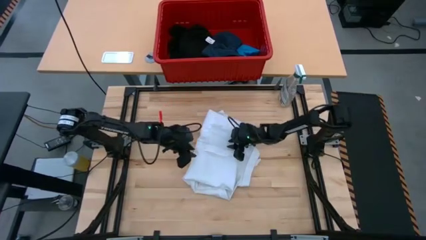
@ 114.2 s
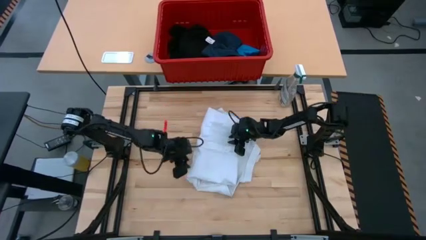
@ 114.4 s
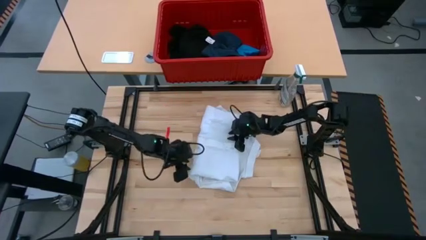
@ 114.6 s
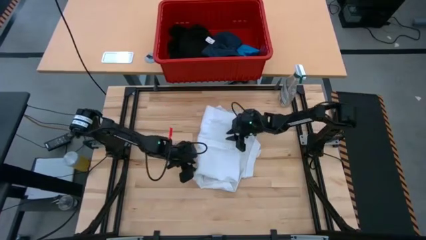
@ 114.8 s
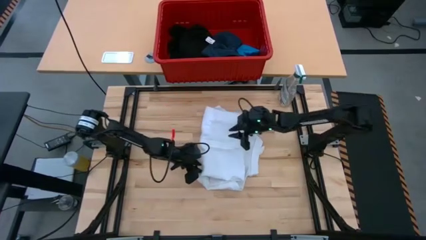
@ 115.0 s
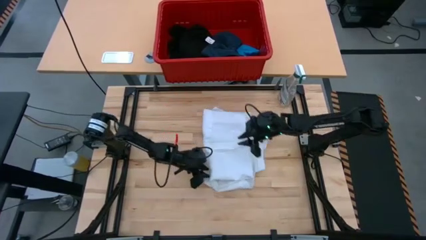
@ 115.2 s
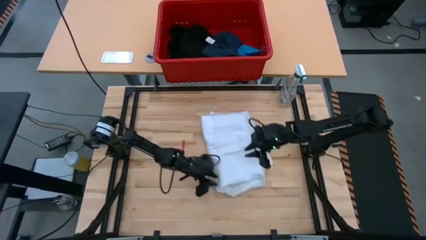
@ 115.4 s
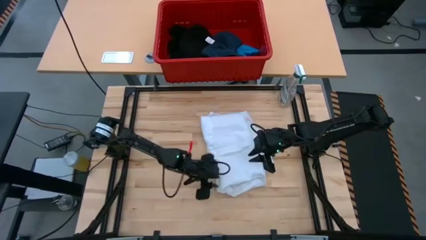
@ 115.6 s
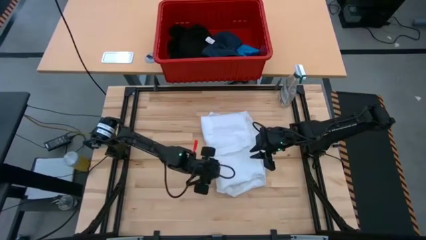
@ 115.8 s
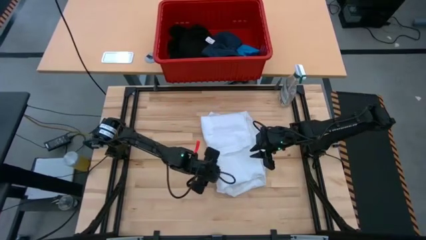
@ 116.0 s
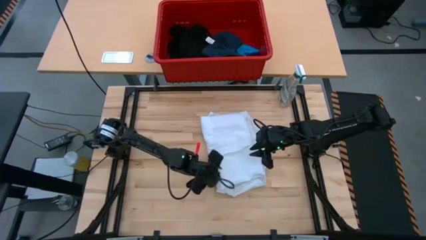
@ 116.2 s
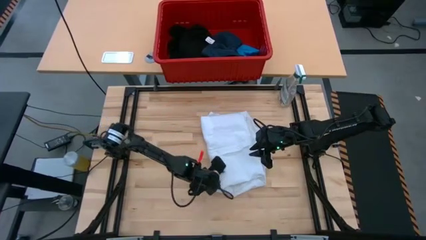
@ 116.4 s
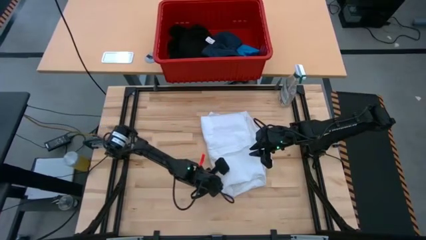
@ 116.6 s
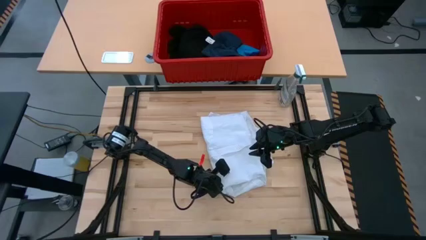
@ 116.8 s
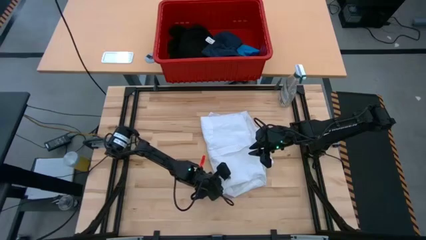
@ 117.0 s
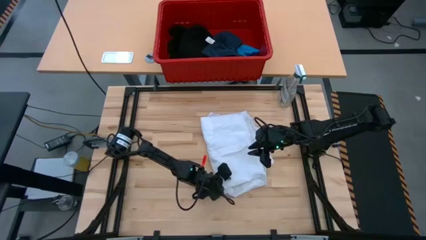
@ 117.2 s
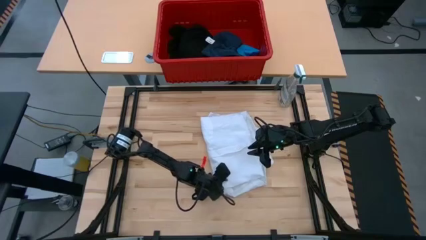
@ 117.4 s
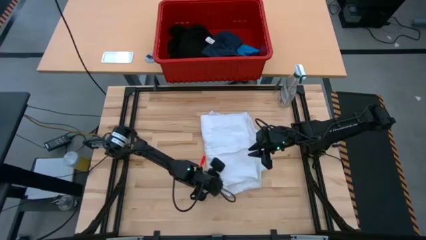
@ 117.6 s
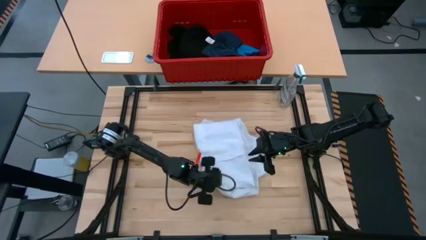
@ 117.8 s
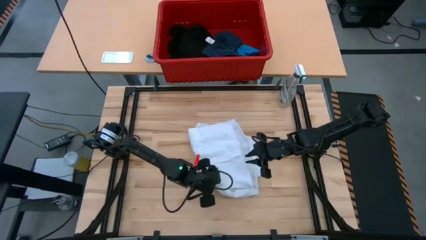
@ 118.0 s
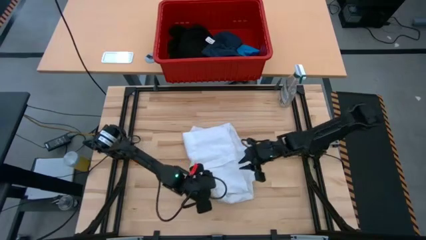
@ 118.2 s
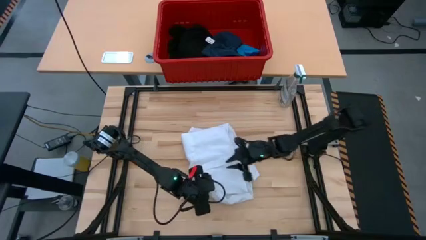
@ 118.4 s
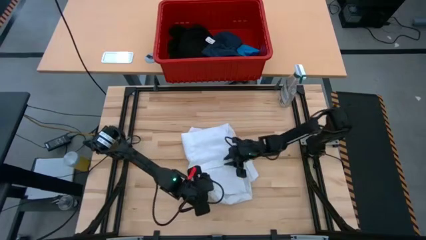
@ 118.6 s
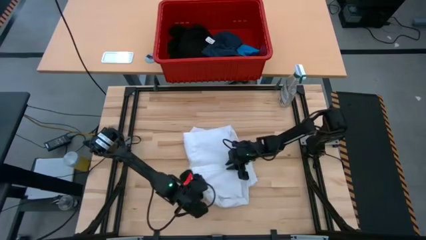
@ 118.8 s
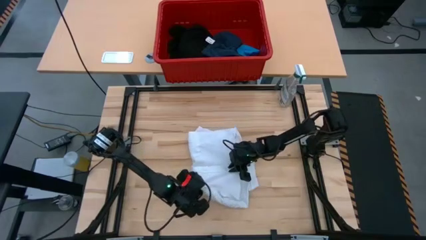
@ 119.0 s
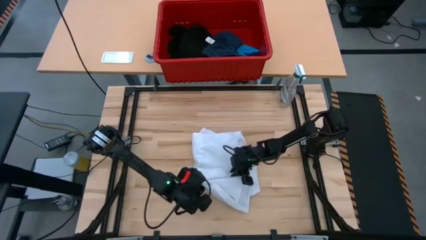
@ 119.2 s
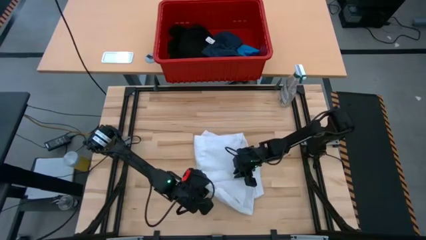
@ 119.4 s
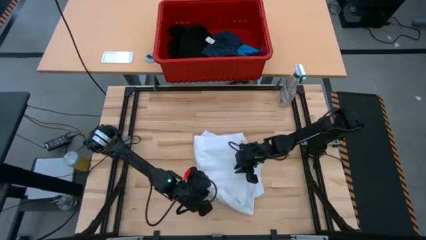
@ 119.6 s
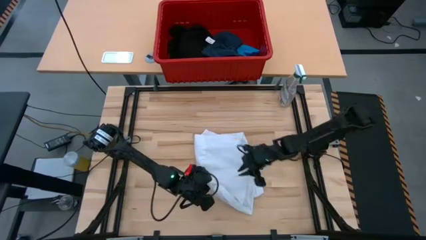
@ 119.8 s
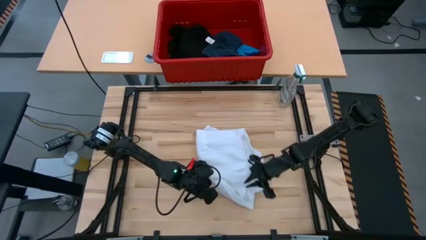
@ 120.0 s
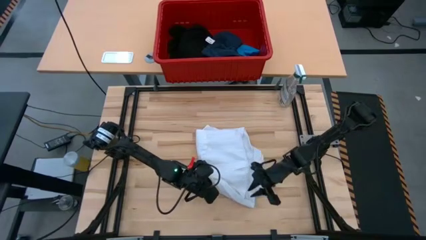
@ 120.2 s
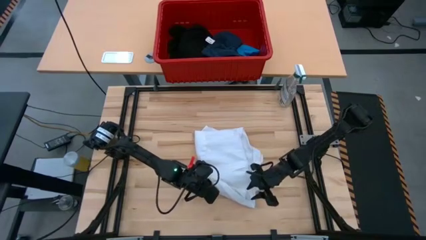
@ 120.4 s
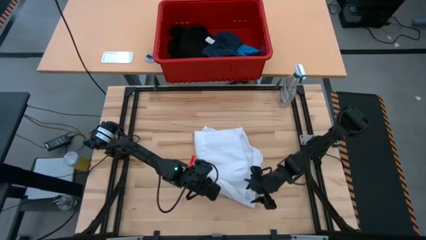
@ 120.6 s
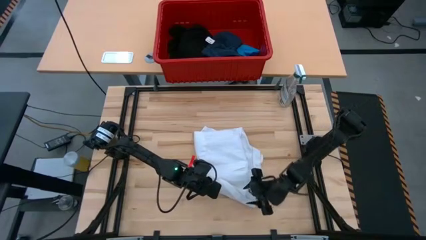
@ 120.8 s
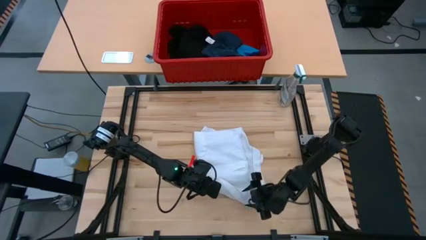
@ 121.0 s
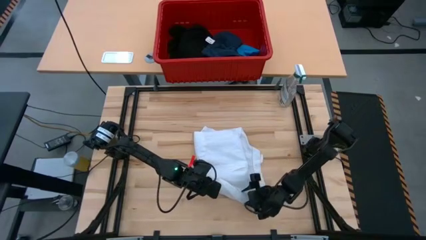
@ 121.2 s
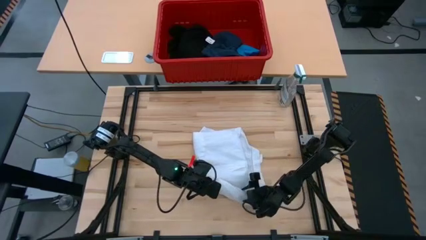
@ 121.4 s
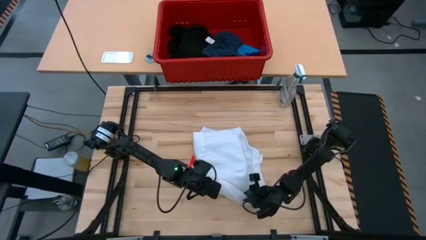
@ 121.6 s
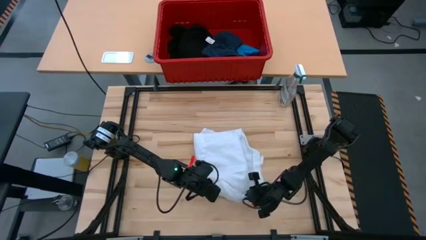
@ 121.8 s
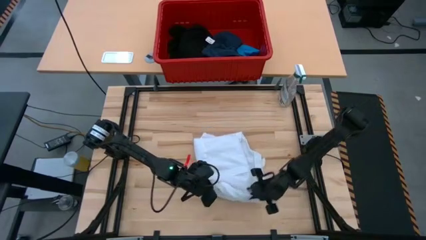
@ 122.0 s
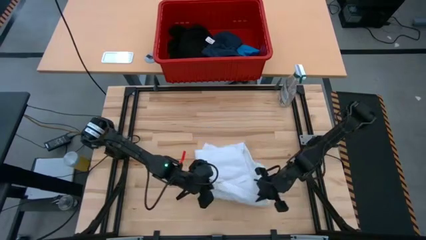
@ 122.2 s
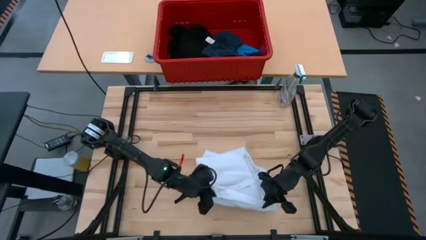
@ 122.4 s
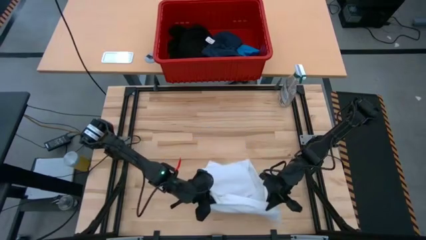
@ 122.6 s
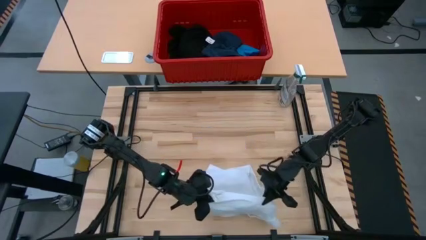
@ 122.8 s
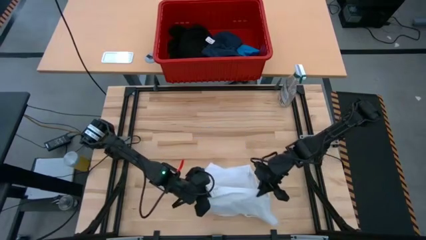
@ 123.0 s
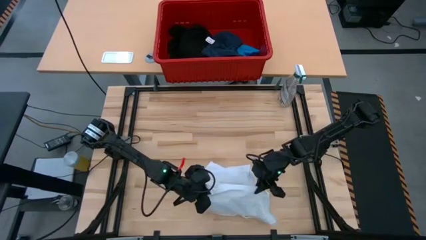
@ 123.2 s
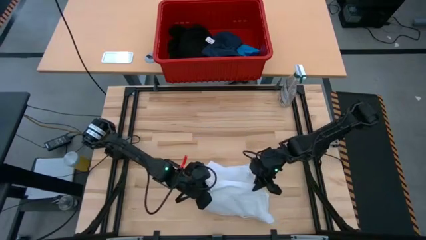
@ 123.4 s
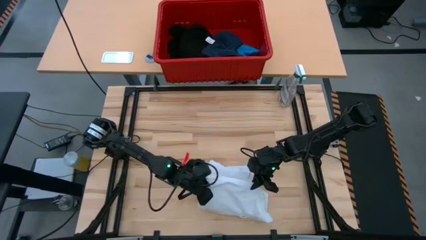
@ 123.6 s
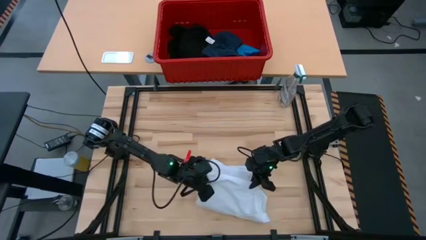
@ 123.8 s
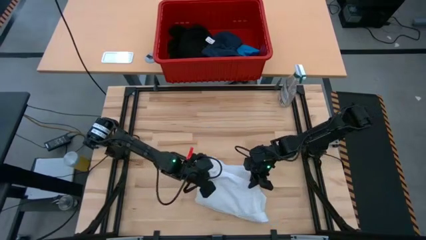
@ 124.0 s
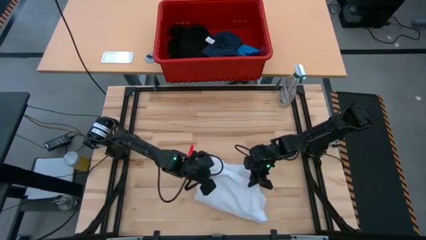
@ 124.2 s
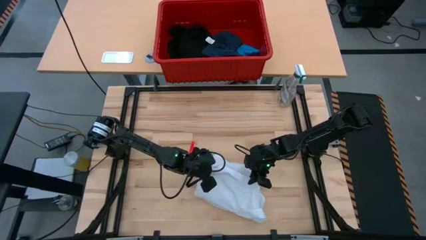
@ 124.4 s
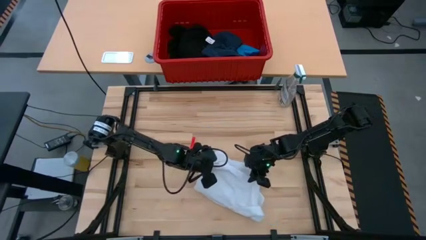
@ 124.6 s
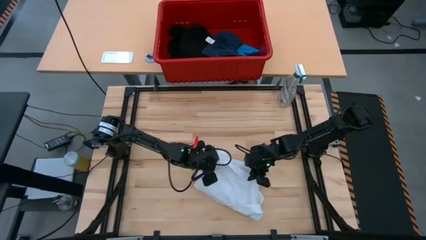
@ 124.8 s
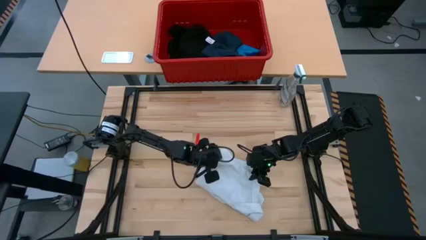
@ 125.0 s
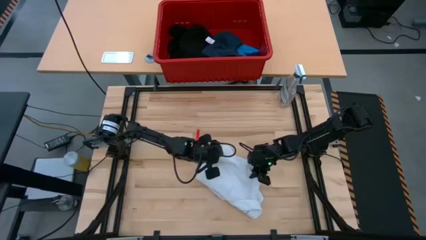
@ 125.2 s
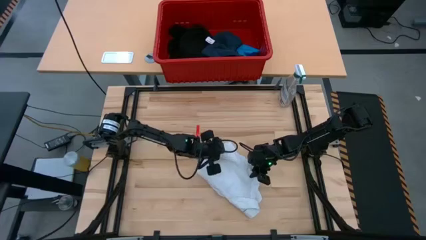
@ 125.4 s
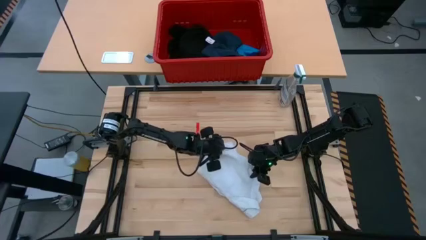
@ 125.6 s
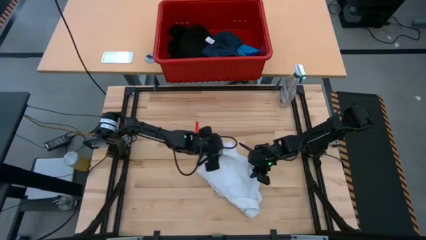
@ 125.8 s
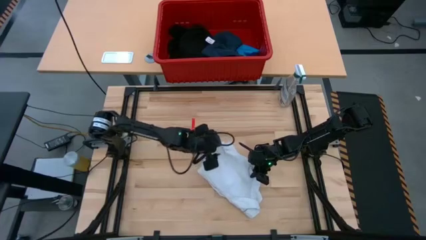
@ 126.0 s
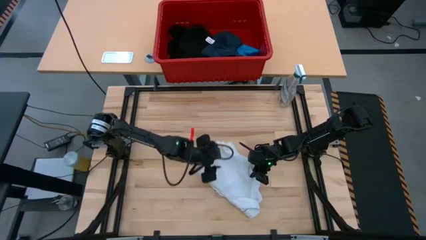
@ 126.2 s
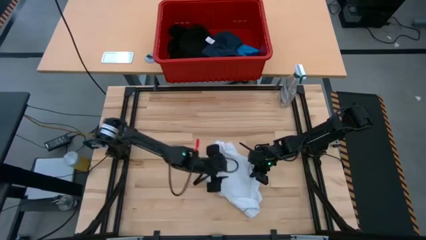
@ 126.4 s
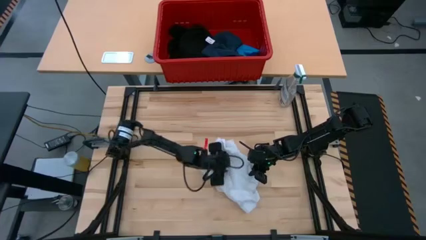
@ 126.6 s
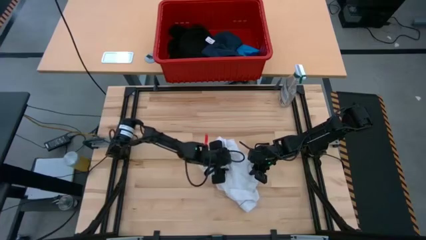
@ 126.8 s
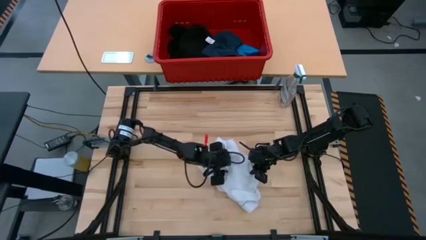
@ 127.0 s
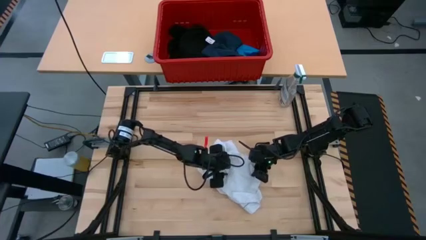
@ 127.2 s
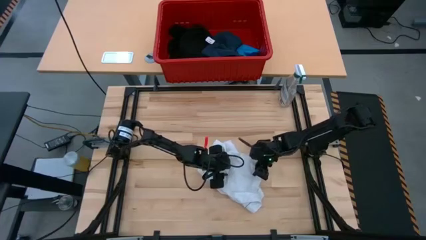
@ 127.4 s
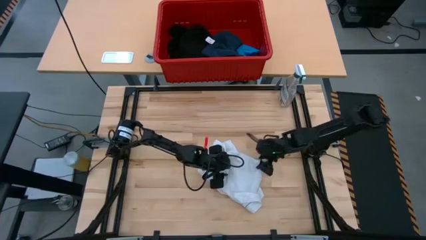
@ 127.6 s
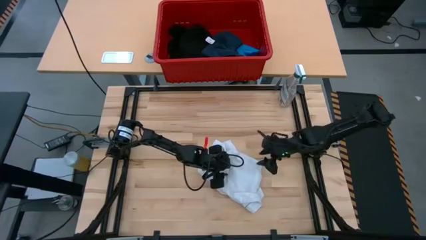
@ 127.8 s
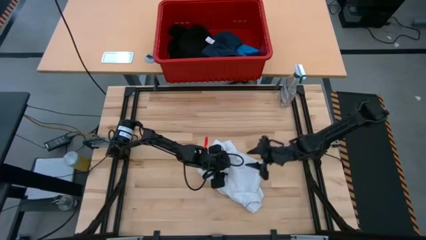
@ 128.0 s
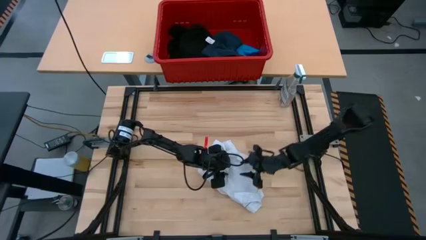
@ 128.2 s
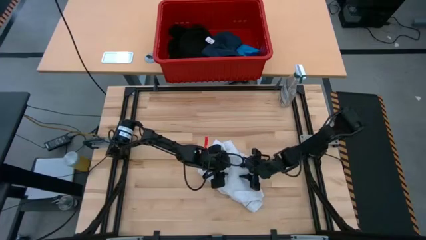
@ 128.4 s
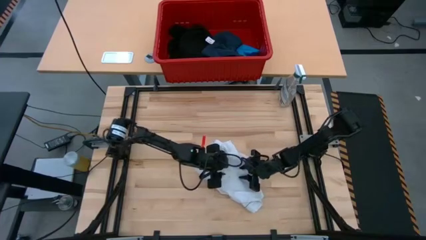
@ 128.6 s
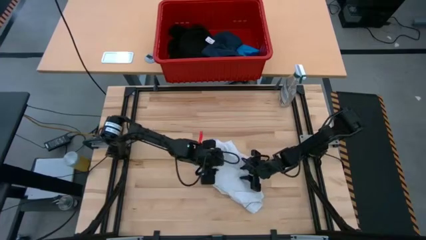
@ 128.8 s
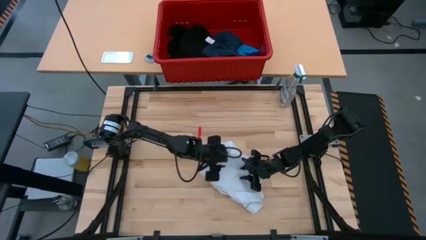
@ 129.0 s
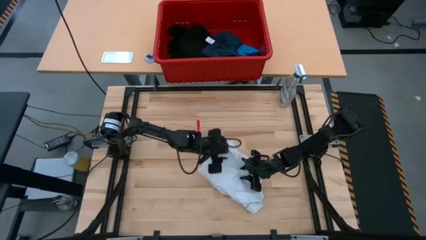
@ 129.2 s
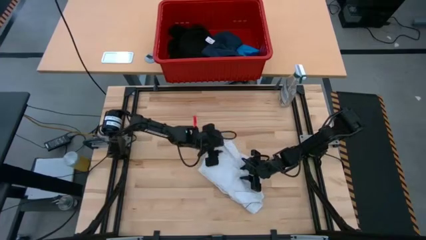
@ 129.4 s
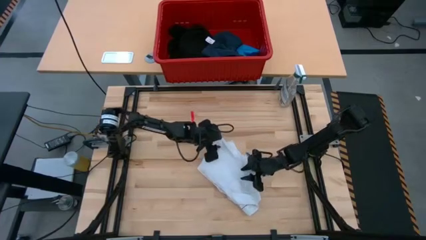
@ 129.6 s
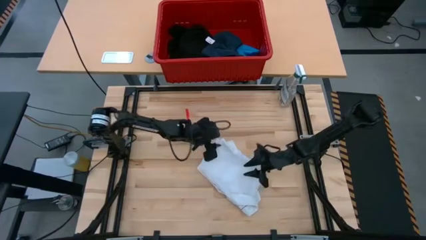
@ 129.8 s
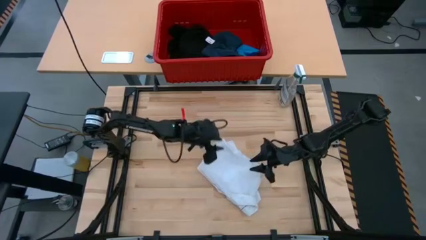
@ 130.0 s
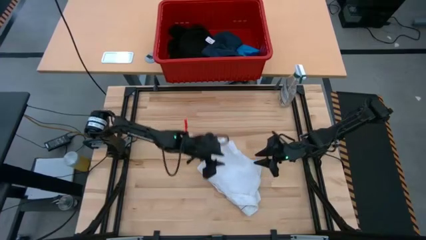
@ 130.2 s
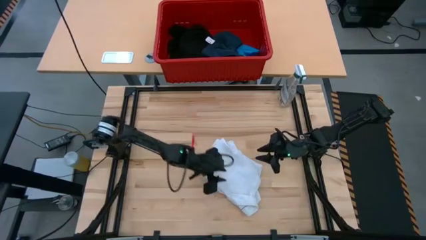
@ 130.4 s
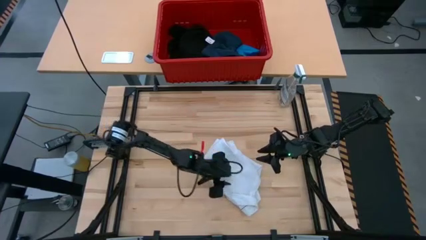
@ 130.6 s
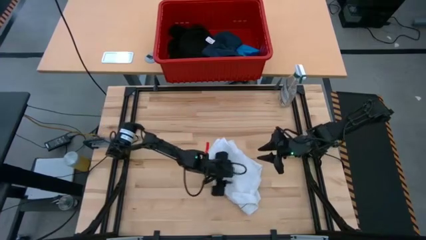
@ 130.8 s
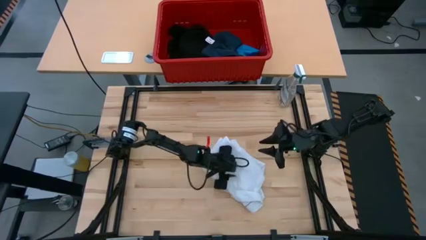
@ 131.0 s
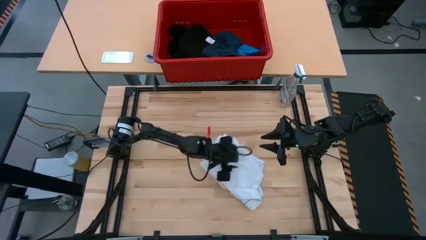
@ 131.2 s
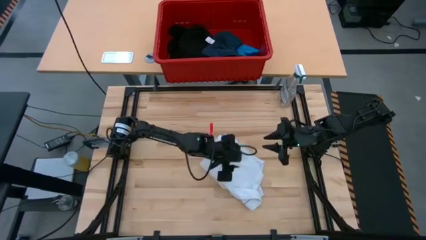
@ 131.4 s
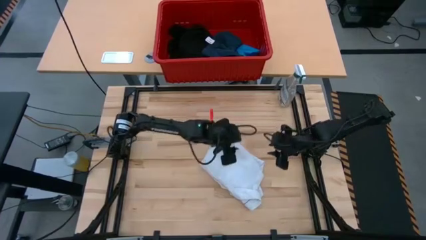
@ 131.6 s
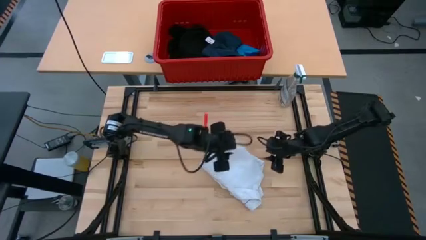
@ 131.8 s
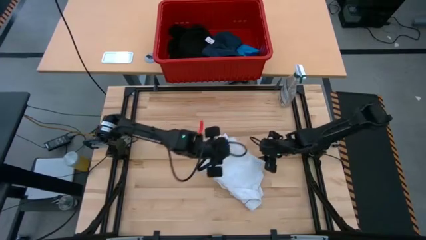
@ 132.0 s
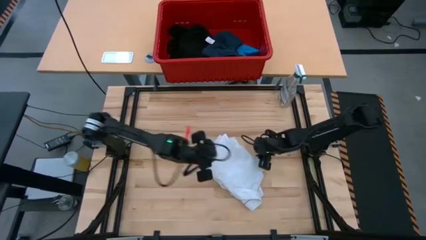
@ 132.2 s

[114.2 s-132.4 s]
Task: Fold Laundry from Bin
Fold the white polo shirt
